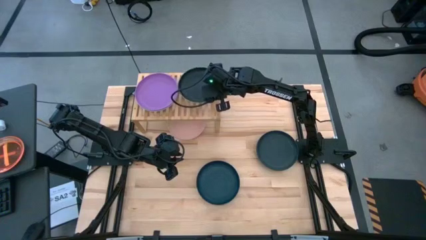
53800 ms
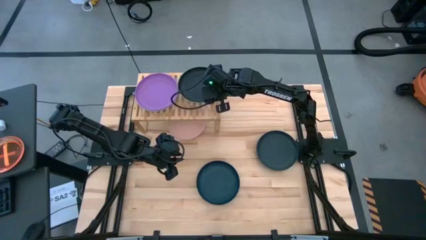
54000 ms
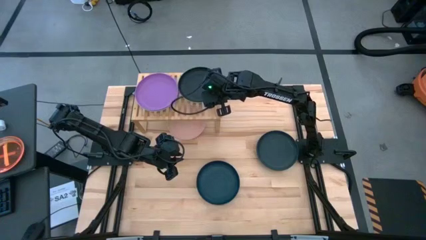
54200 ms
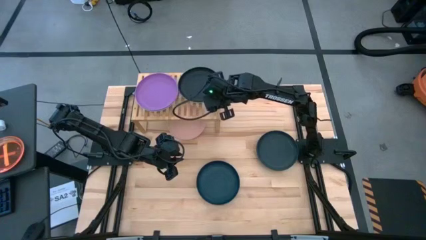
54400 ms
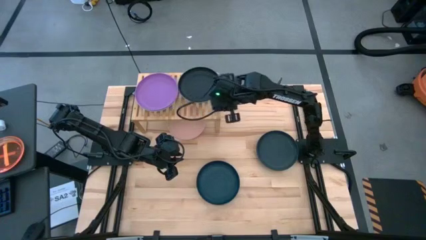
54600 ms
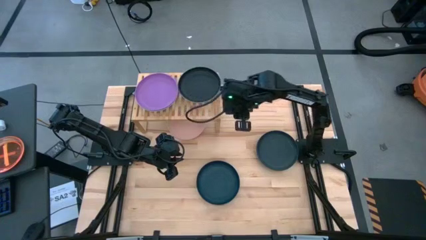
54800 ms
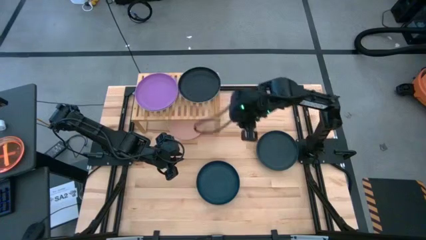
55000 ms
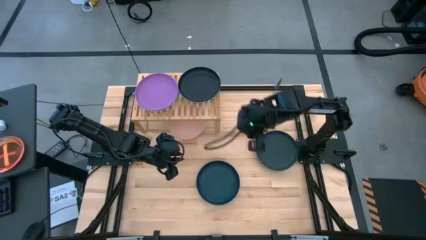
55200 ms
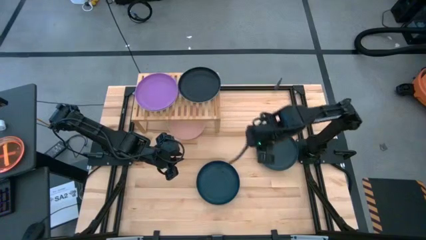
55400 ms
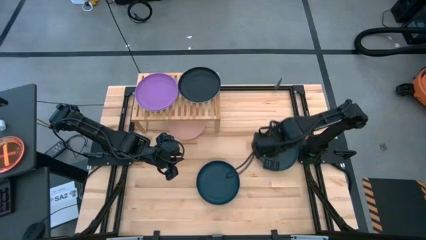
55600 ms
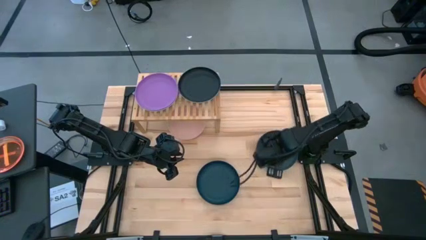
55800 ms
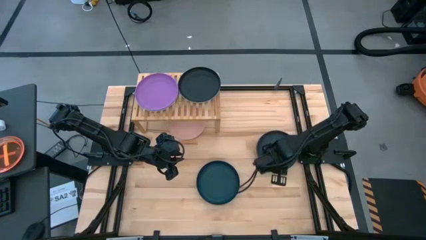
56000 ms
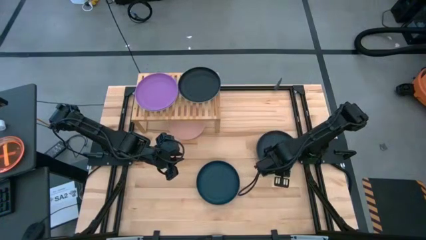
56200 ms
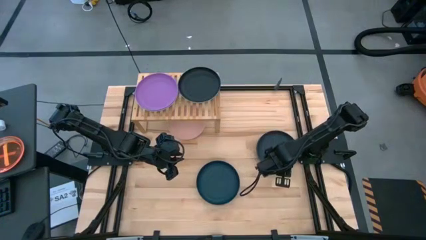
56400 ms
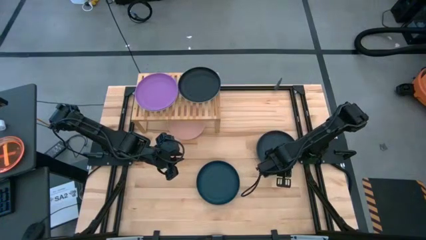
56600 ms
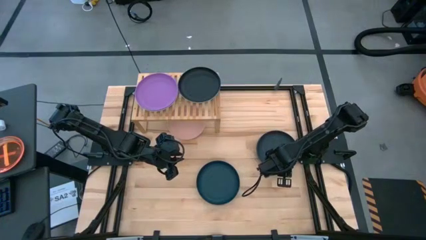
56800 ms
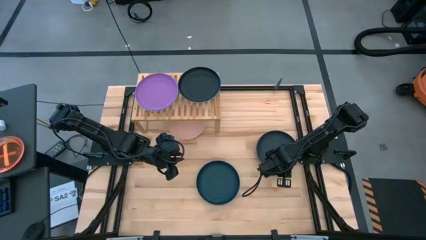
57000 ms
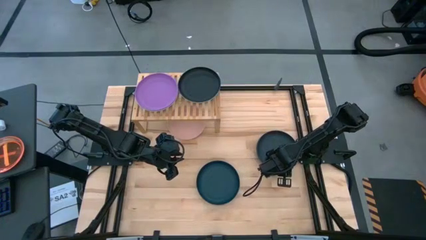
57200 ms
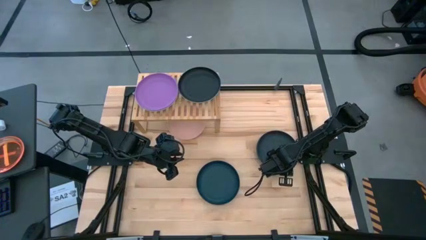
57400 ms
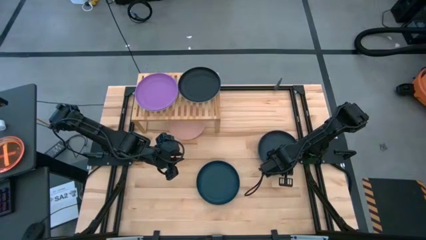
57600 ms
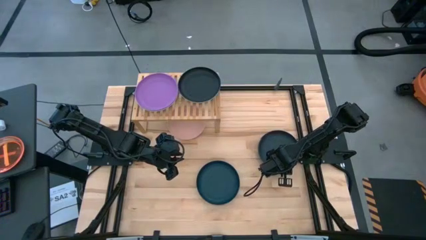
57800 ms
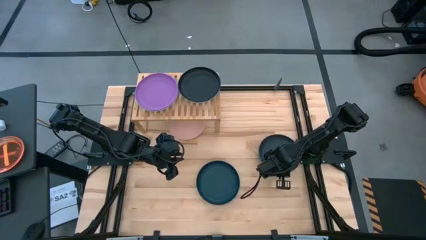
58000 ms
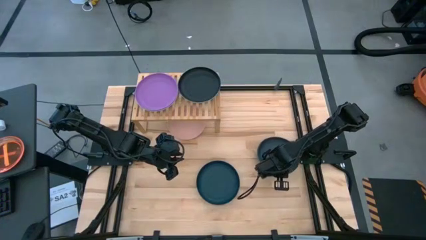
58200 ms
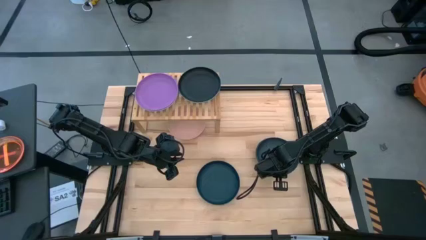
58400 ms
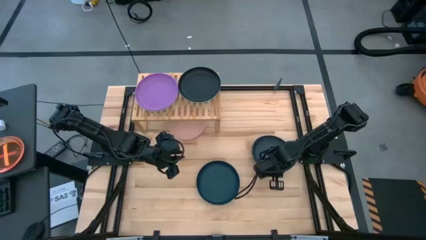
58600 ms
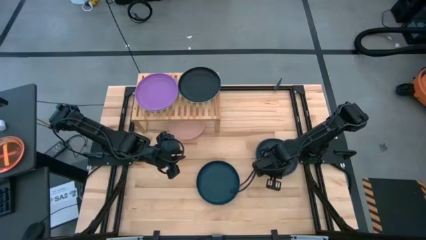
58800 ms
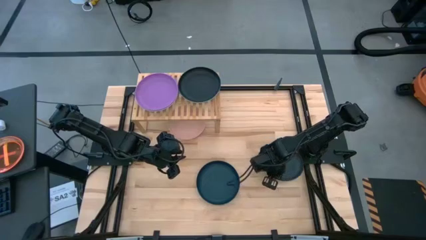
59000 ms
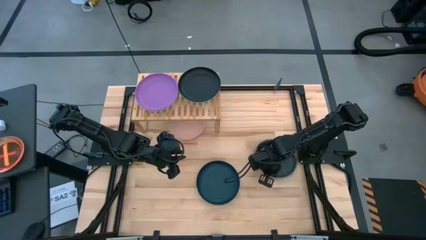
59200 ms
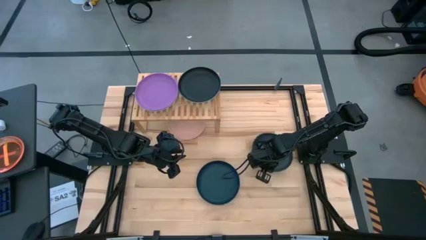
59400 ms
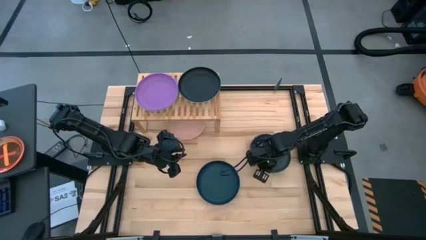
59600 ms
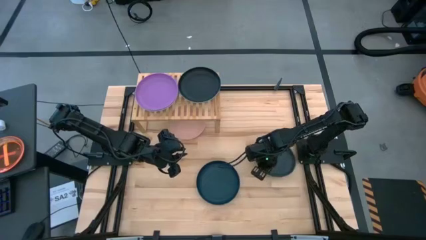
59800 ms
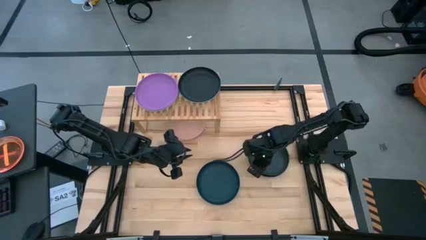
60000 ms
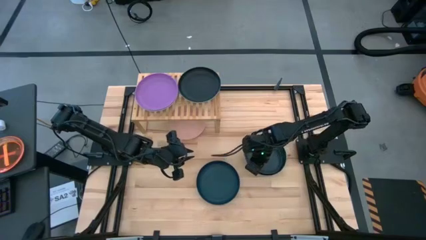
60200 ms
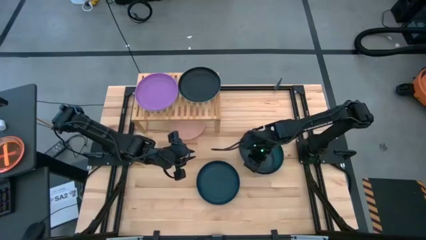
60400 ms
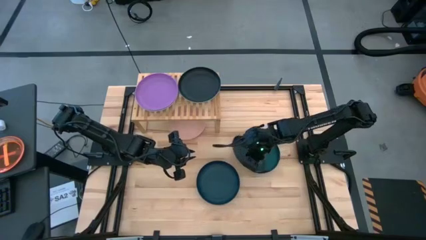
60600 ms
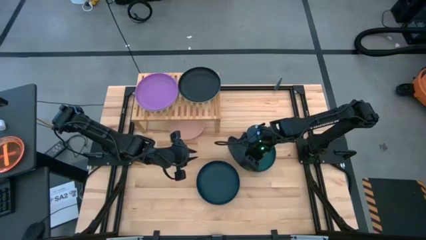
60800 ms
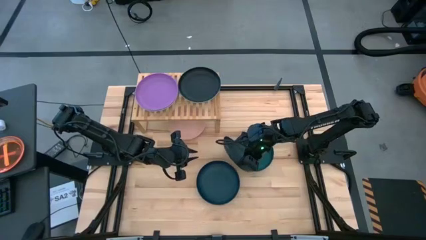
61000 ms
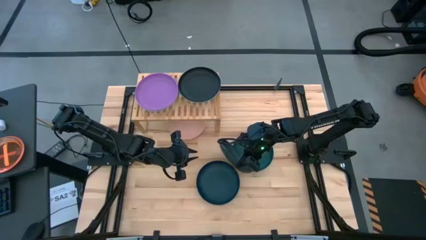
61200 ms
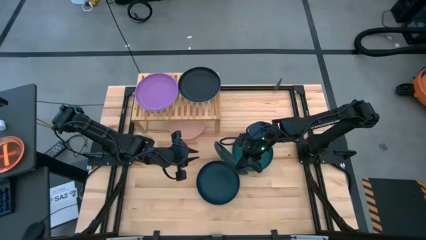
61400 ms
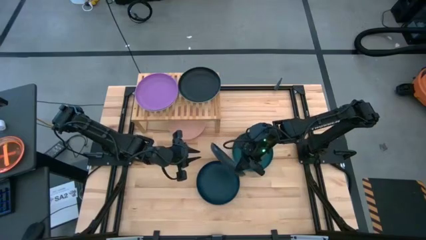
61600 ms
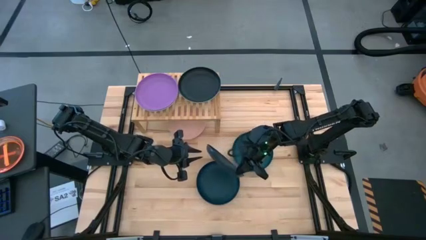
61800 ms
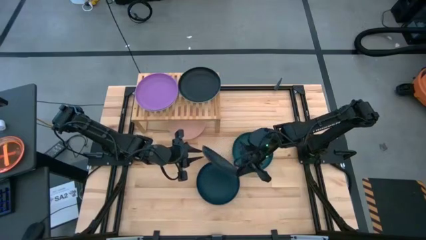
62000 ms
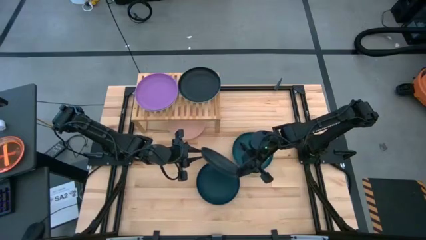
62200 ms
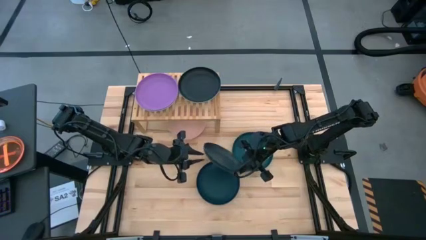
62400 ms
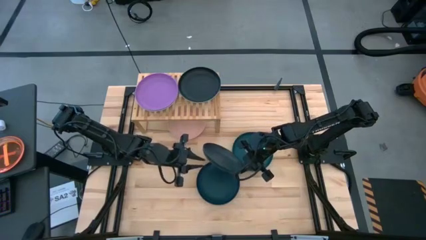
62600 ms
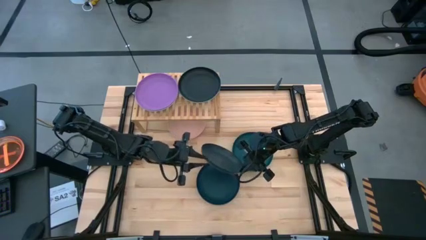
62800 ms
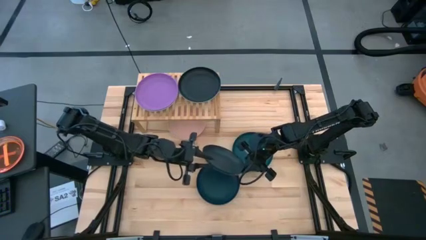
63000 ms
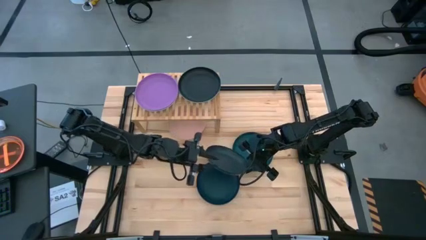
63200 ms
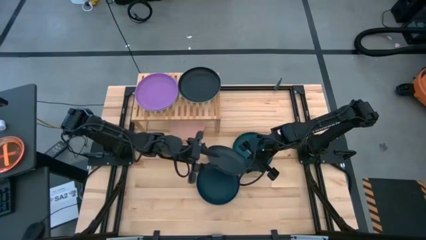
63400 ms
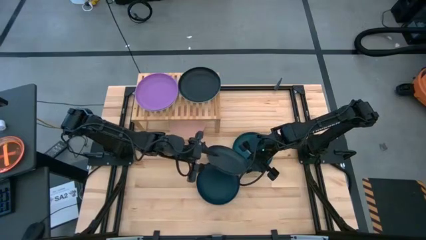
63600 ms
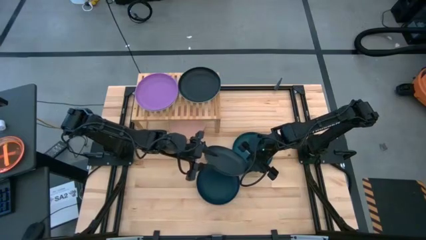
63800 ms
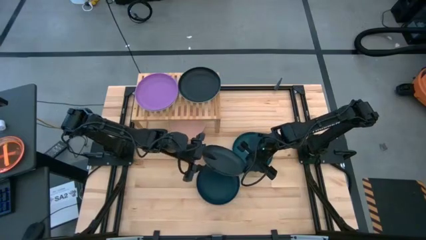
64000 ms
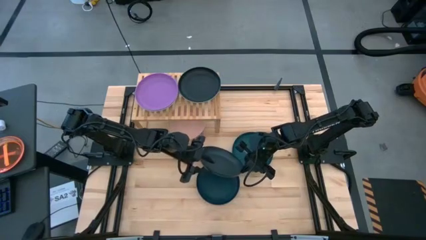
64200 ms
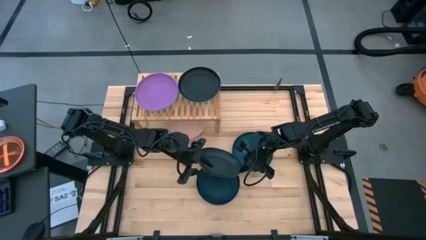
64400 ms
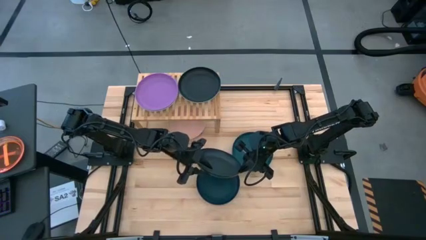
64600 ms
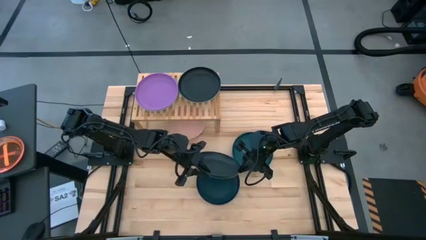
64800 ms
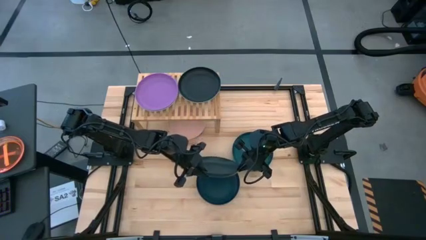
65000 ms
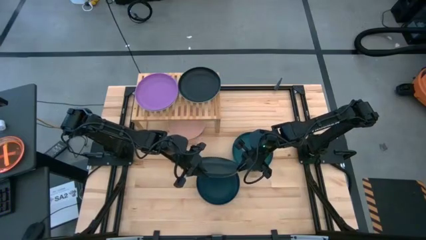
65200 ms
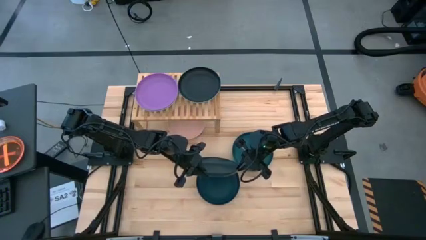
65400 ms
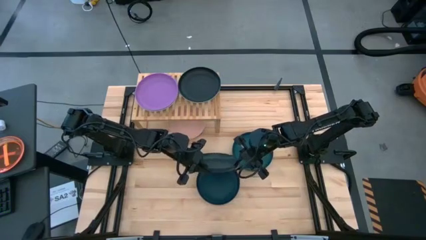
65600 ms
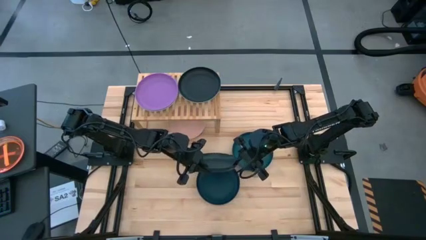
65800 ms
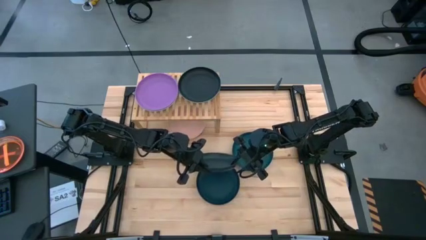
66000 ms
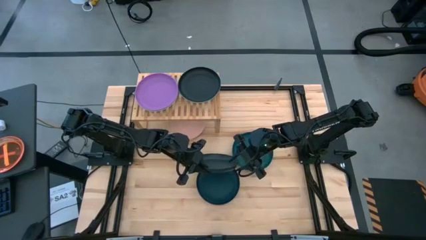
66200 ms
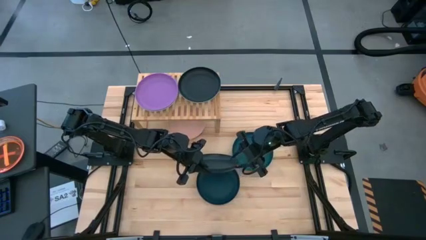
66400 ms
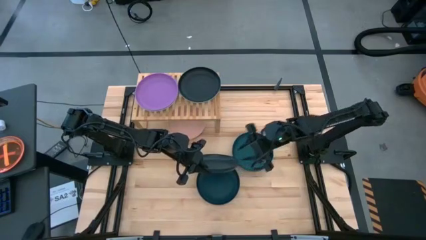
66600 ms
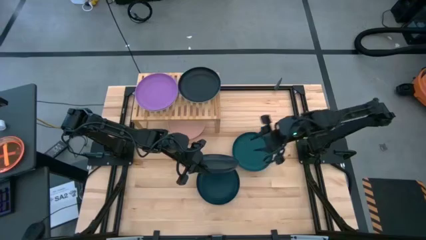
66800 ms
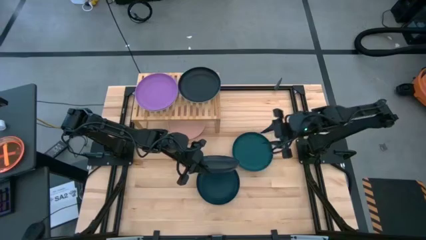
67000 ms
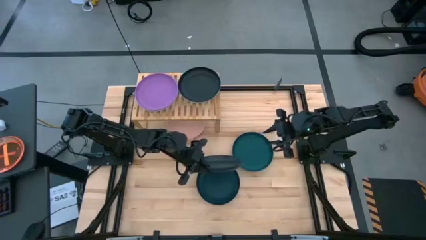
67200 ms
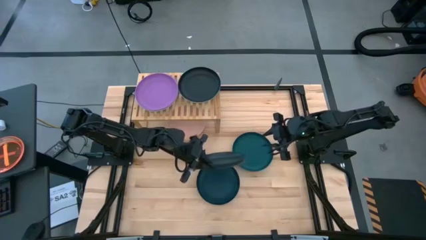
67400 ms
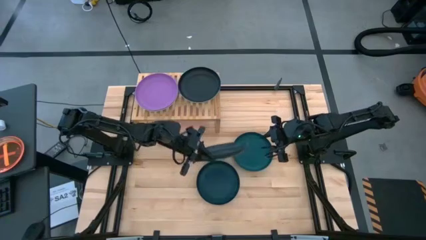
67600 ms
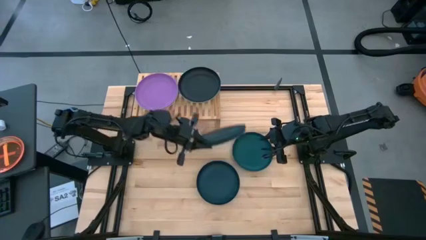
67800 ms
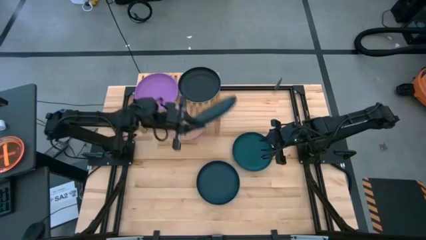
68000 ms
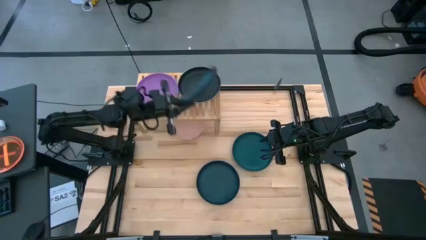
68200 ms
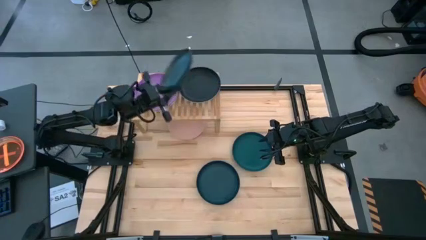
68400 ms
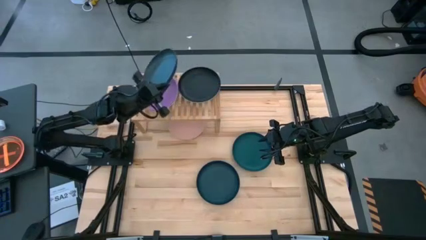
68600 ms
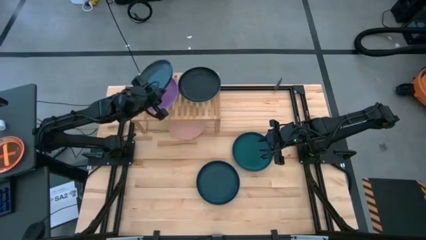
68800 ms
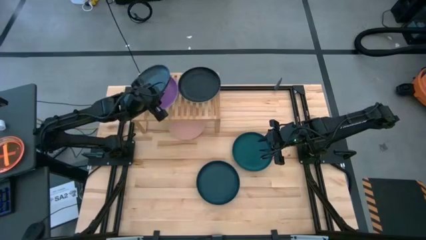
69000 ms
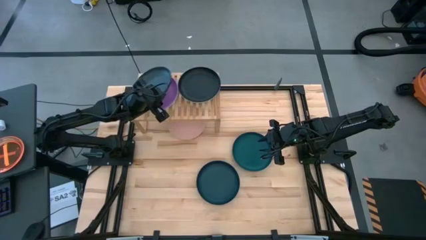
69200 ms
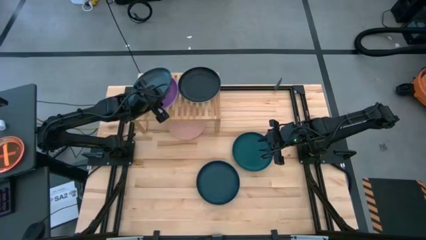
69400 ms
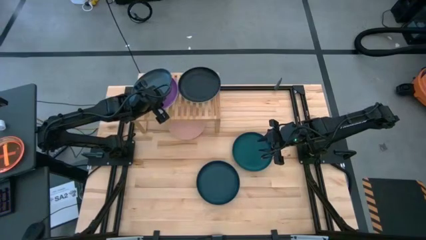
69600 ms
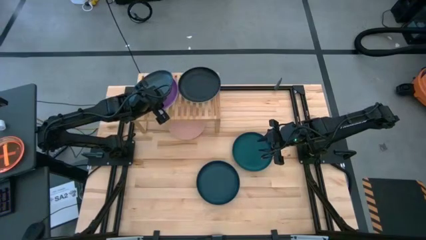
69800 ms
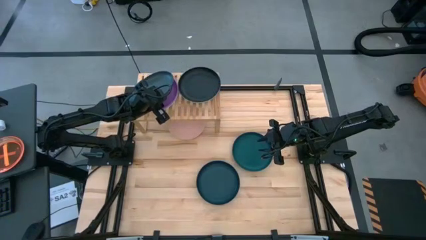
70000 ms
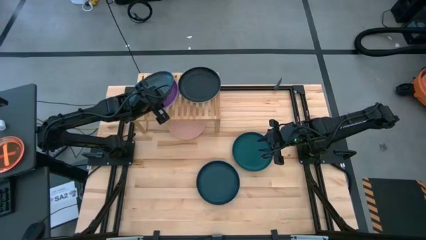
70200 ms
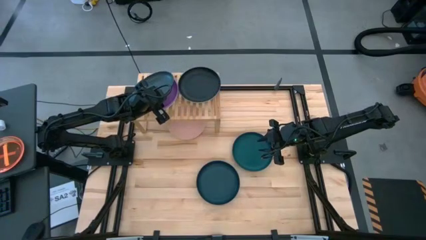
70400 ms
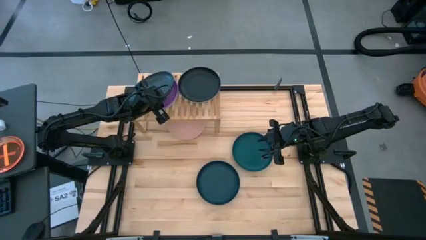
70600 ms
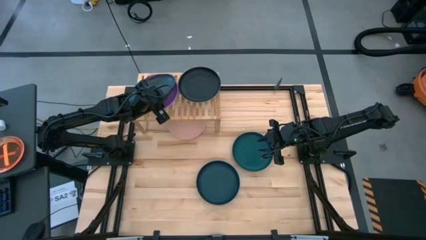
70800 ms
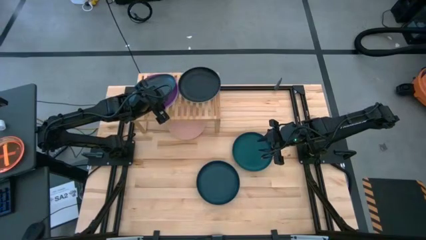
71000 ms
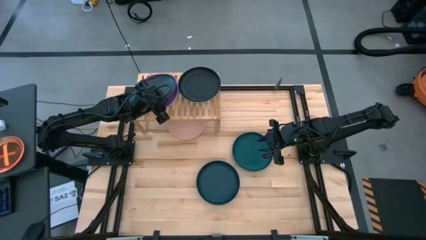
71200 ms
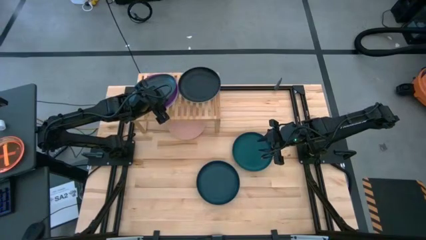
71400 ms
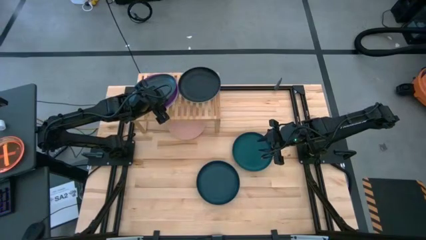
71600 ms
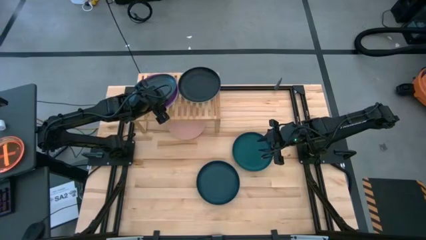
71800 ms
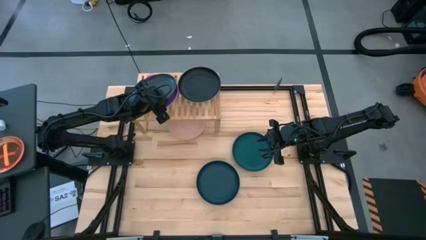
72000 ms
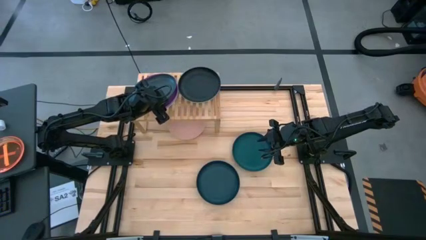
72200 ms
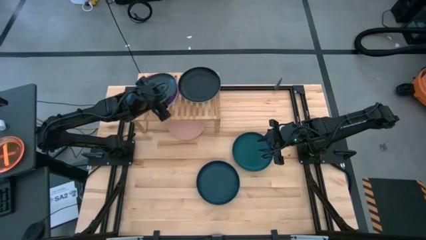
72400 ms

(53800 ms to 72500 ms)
Task: Place and stack plates onto a shelf
Stack the black plate on the top of the violet plate on the shelf
